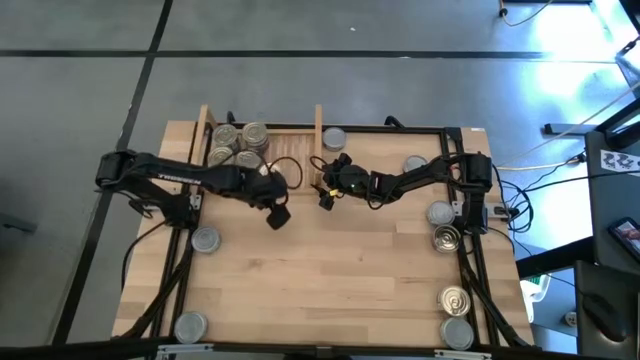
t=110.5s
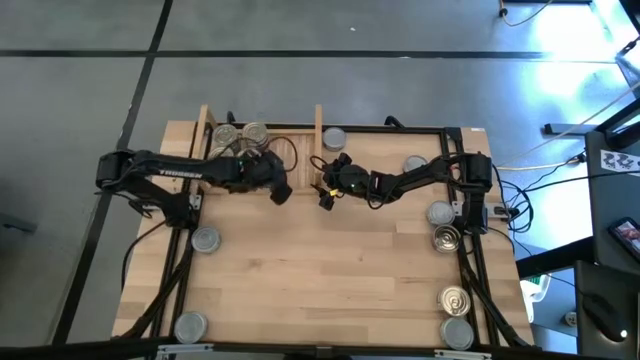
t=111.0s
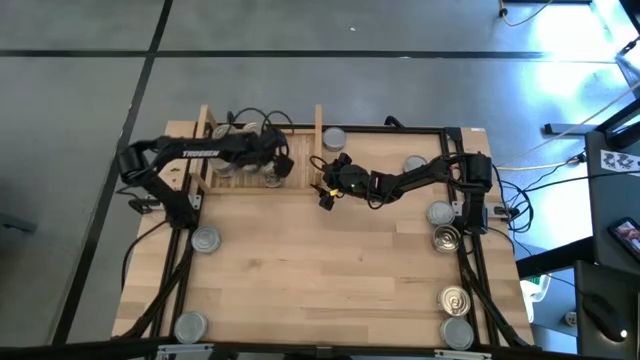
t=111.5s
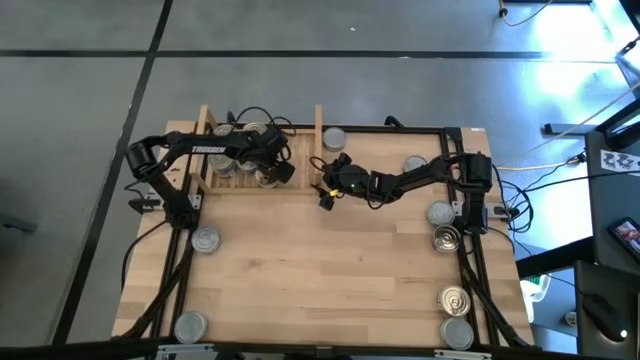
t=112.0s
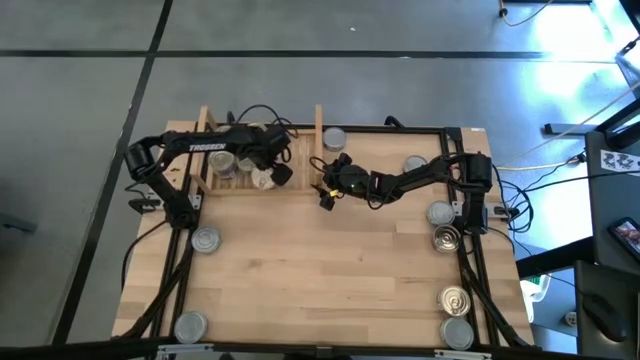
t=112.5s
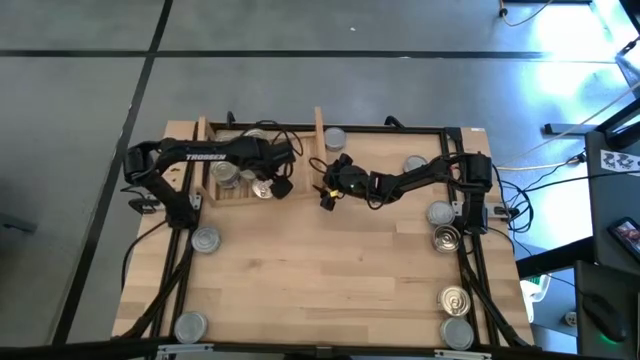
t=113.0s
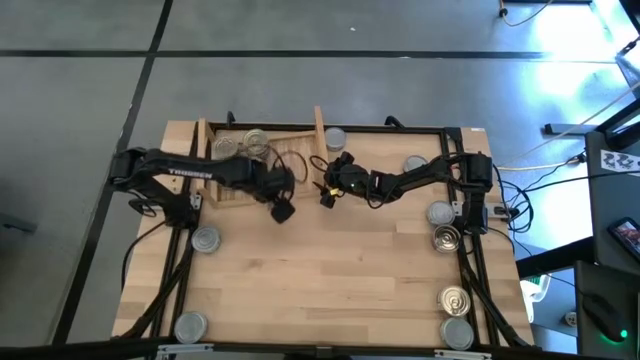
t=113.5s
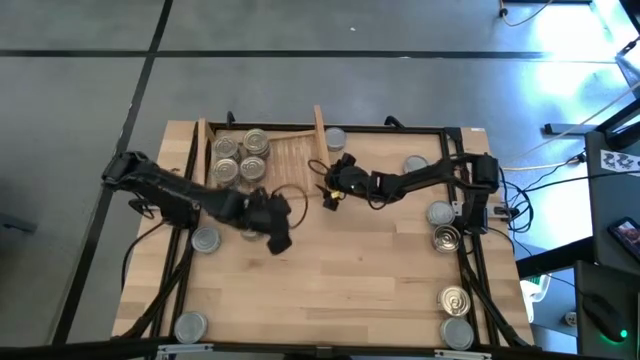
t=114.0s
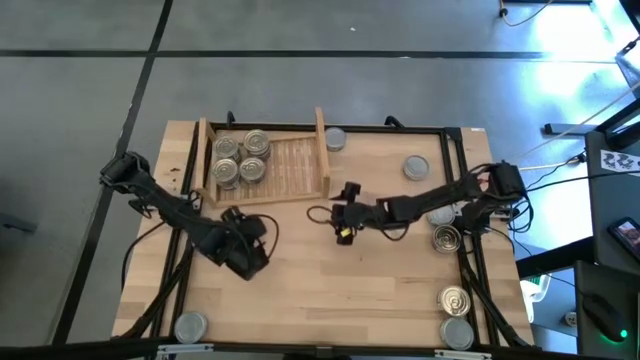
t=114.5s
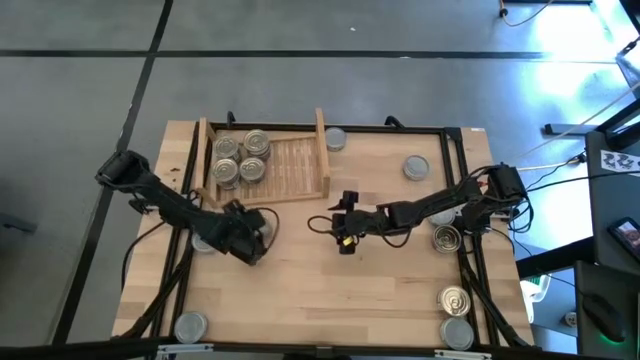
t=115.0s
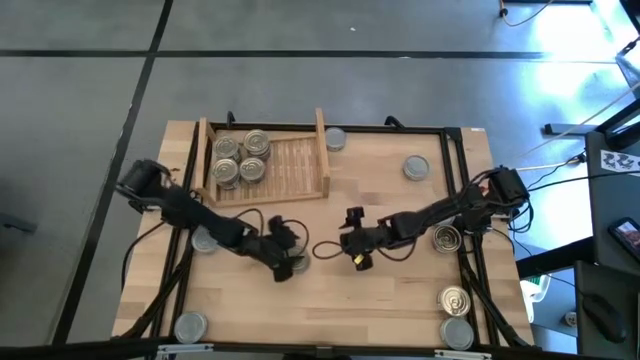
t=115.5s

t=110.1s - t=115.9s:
Task: Stack canned seafood by type on shelf
Remove the blue tuna can from the shelf

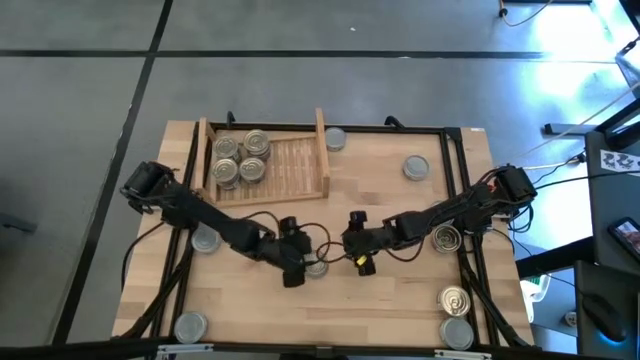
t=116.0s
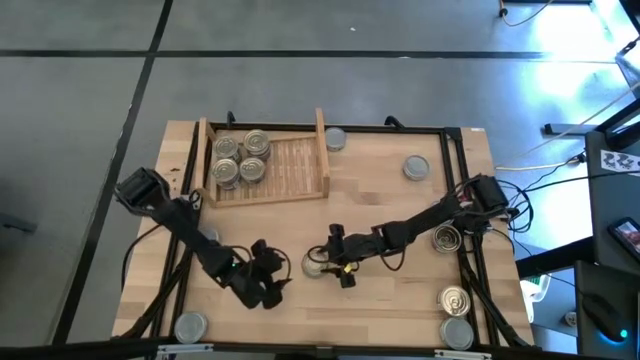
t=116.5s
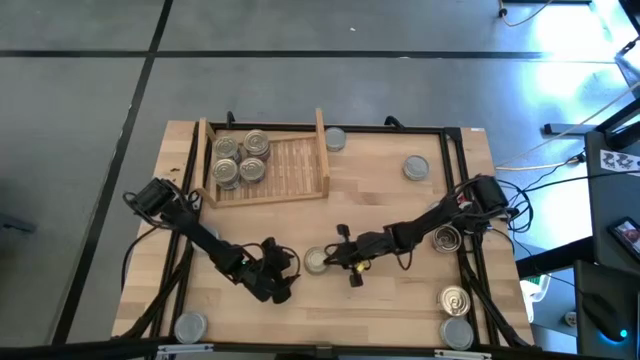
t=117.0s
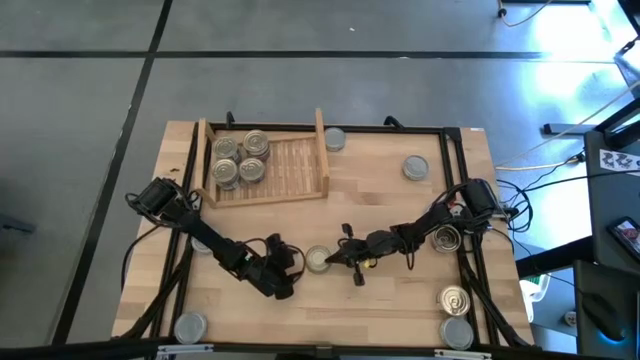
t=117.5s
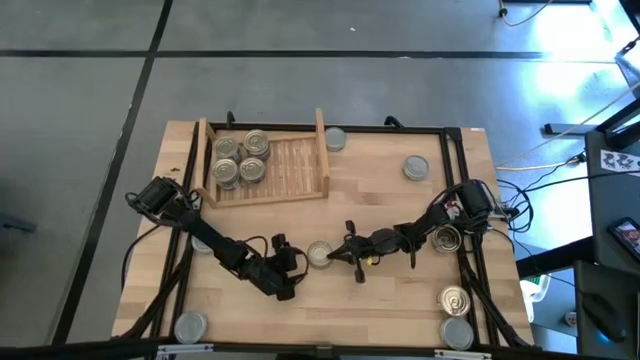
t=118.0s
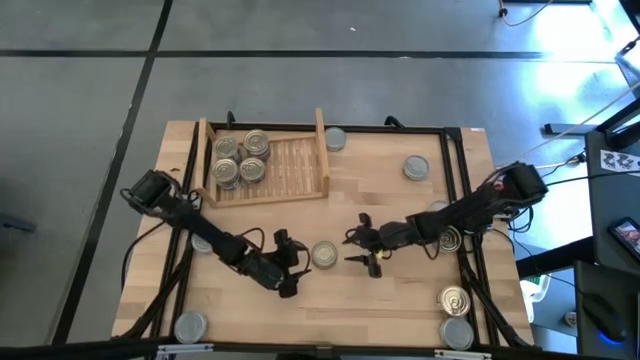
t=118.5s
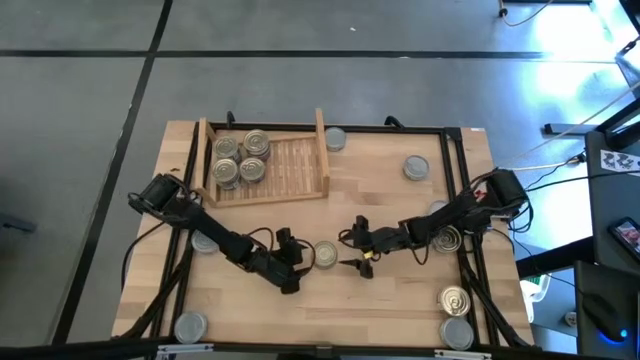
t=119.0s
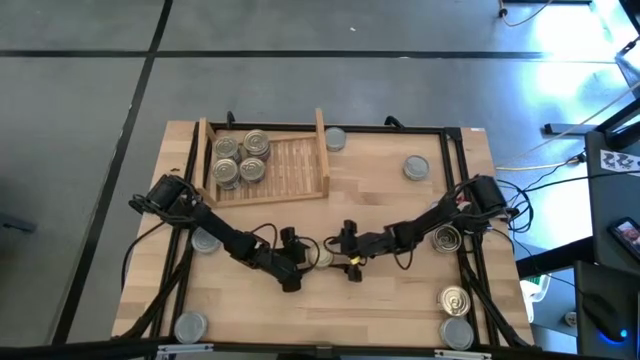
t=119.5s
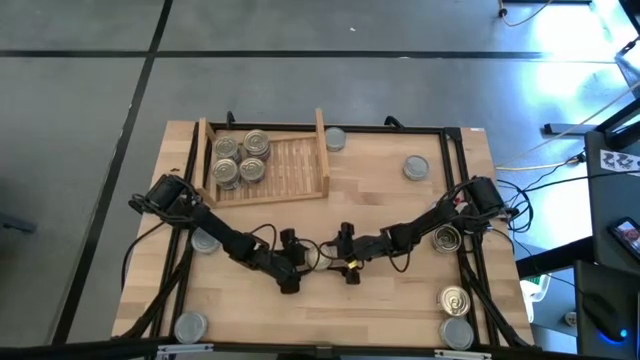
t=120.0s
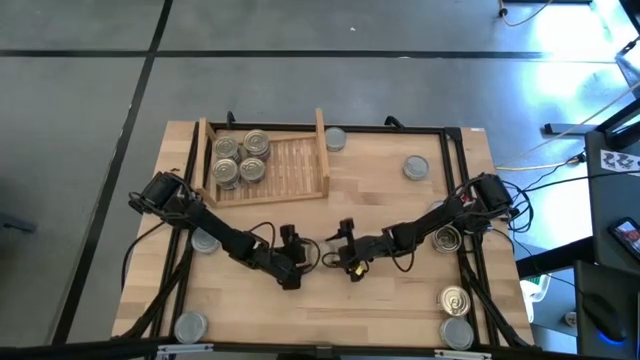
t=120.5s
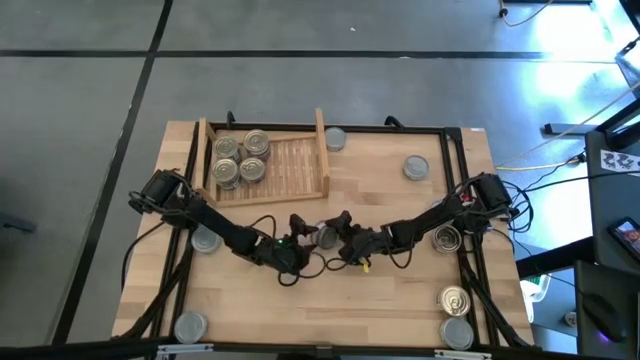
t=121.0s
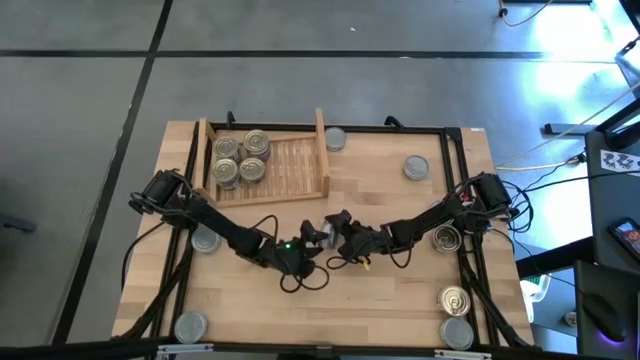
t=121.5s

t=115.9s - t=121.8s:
Prepare the blue tuna can

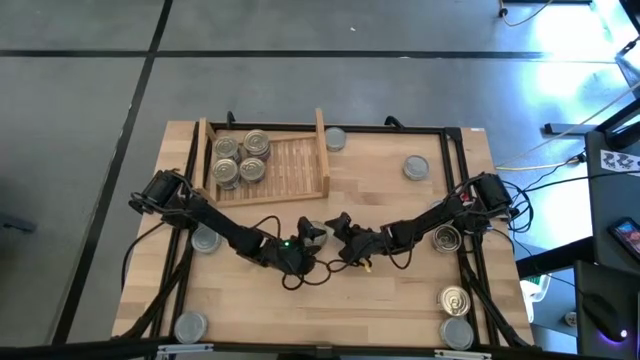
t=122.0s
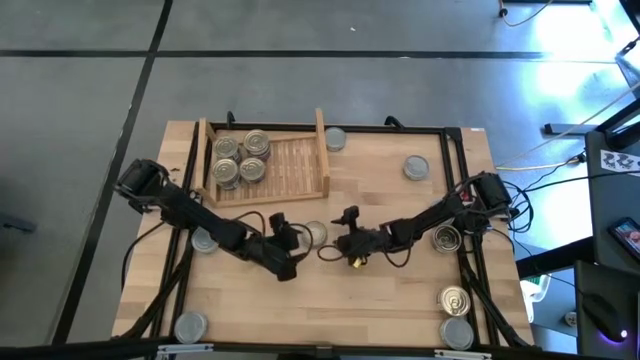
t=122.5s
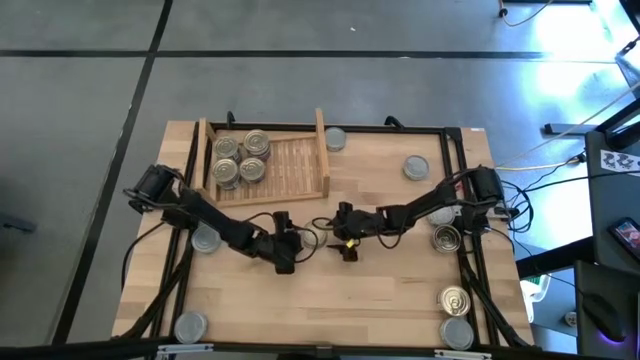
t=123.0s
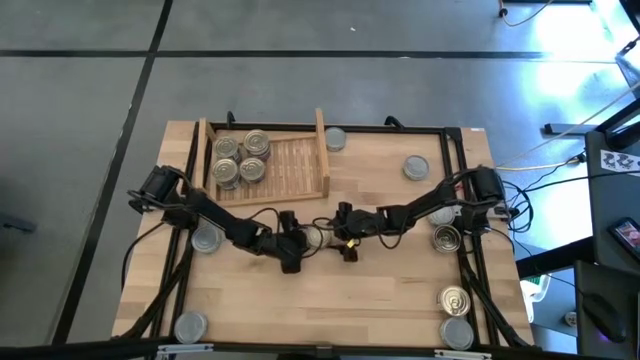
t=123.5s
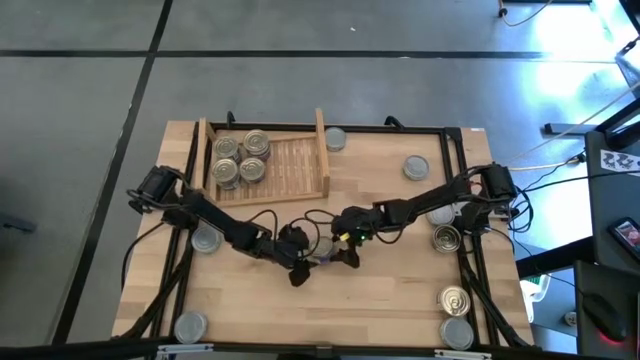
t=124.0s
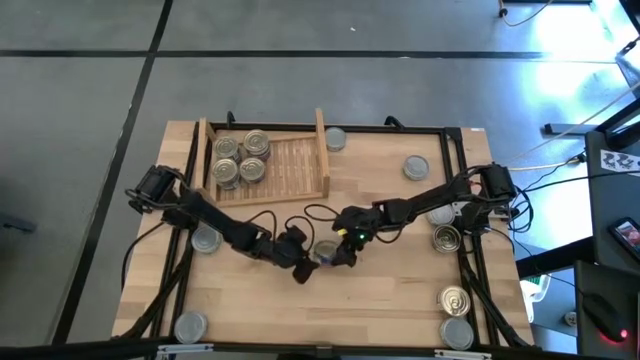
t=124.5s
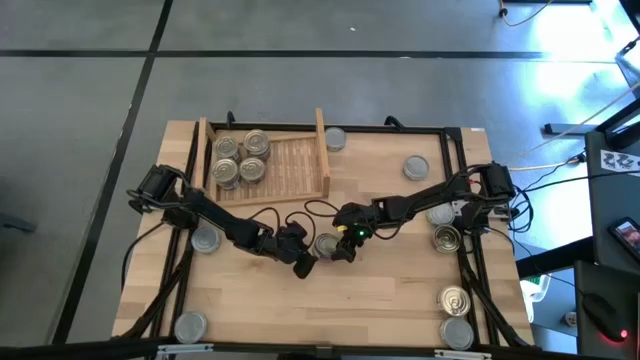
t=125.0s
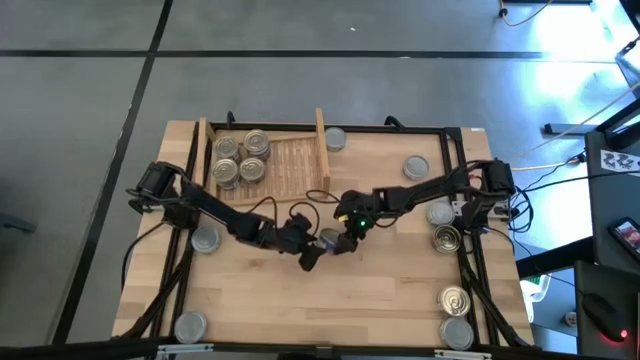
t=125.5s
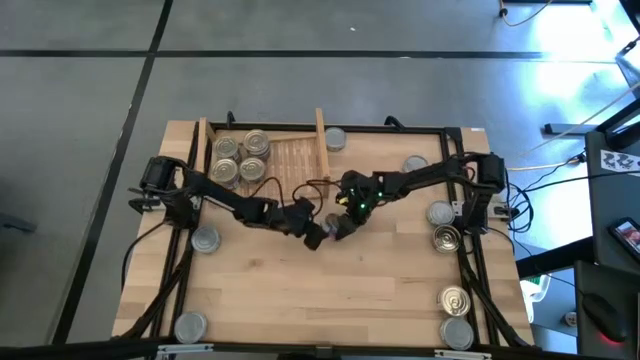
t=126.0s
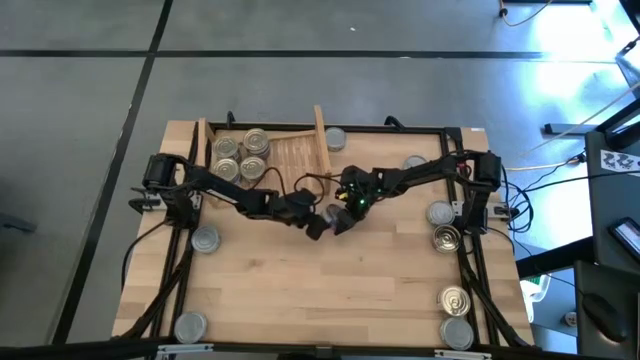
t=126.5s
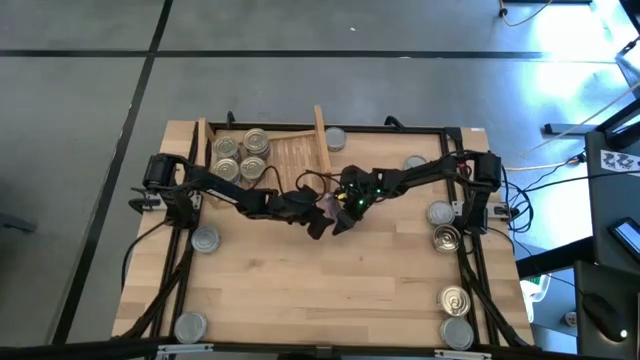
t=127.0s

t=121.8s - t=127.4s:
Prepare the blue tuna can

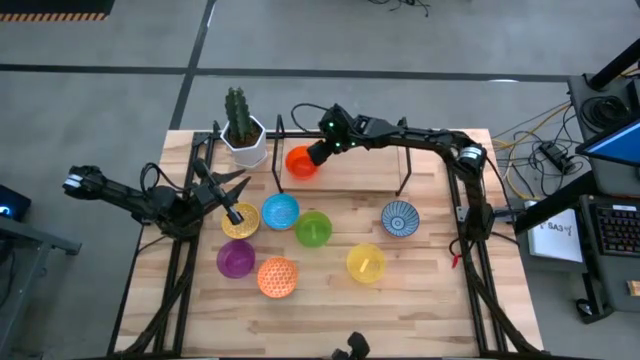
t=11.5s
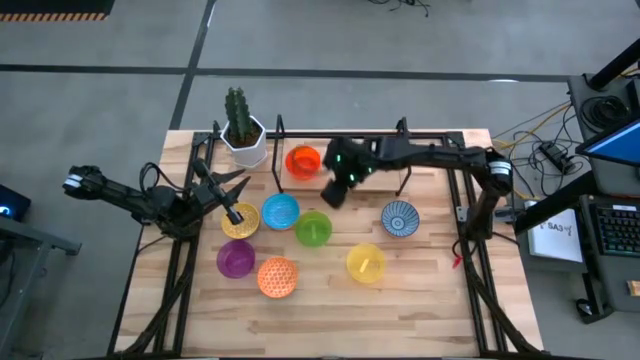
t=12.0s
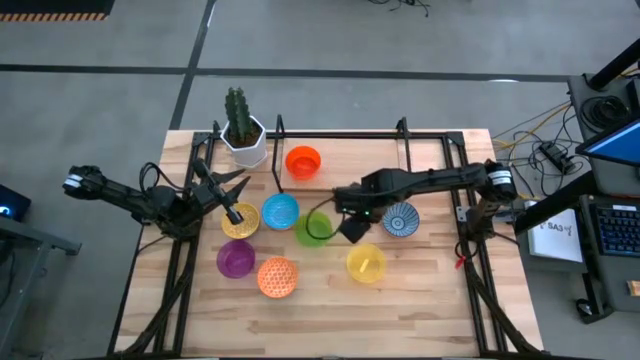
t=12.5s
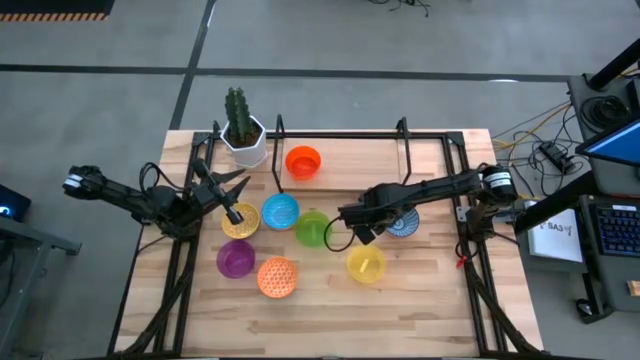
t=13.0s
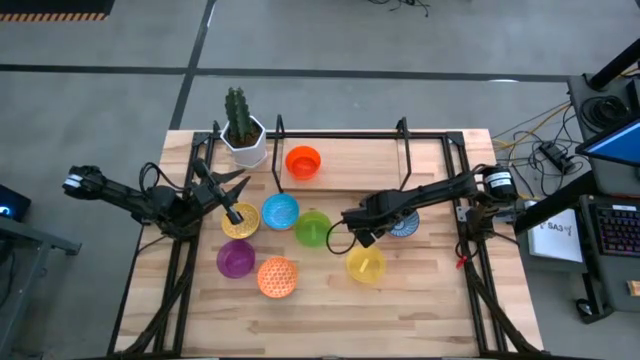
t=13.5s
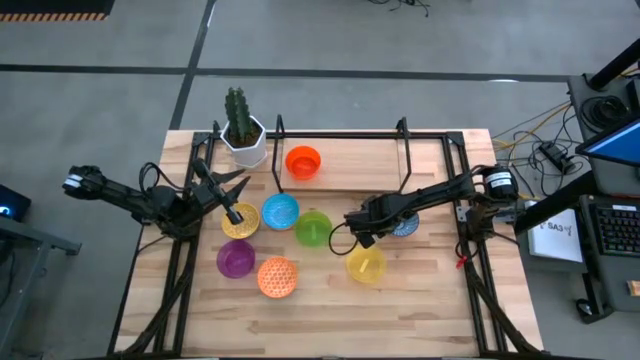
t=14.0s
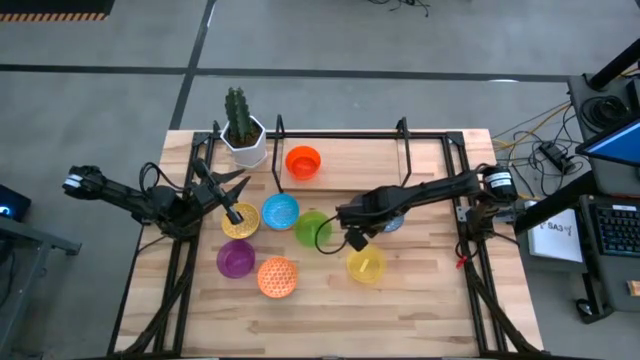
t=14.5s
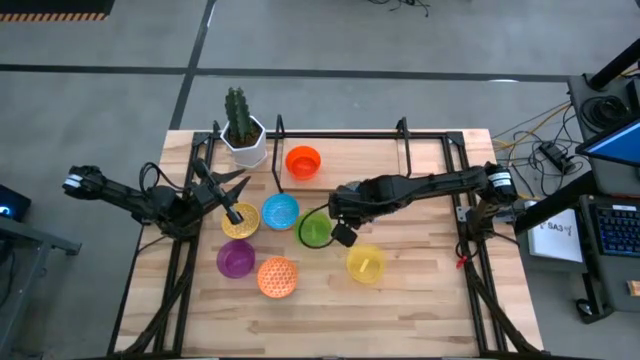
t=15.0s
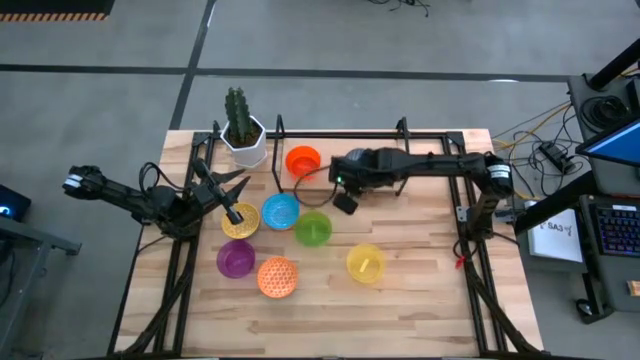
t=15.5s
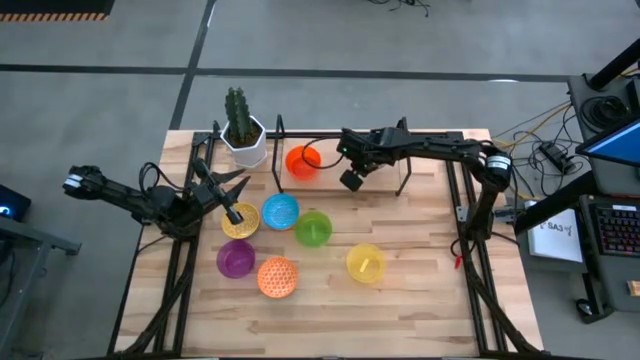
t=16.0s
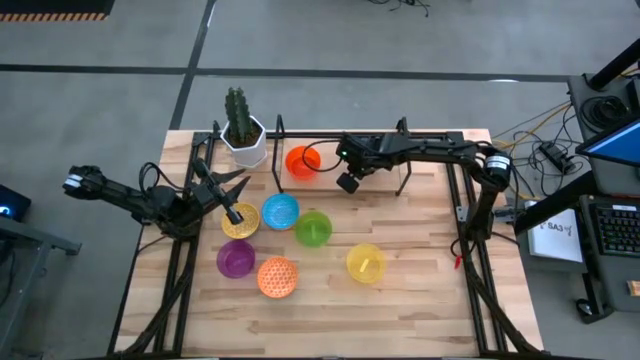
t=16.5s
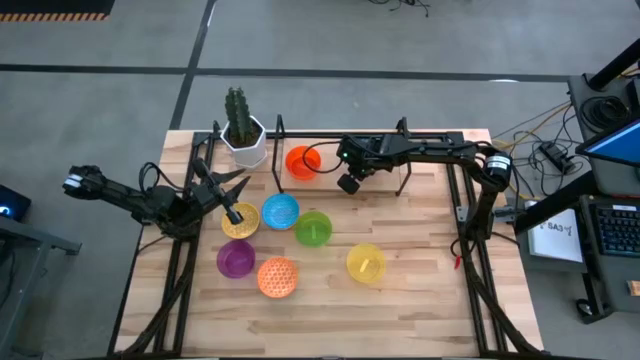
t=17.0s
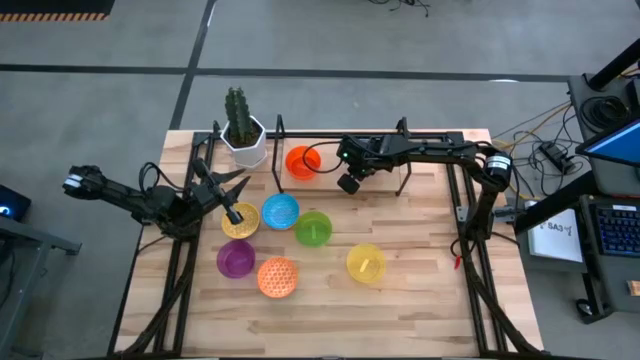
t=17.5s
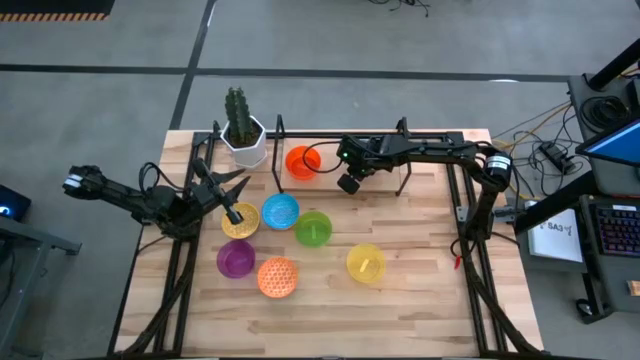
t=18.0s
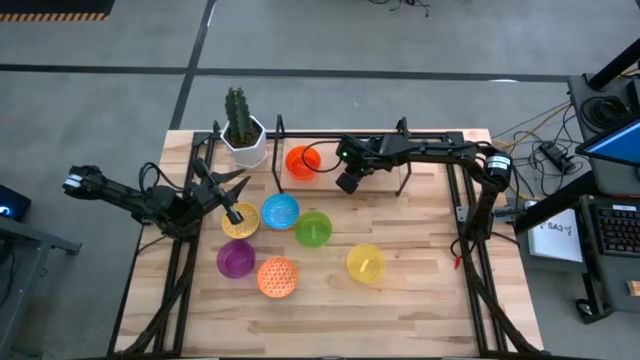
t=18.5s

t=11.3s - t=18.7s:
Task: Place and stack bowls onto a shelf
Put the blue patterned bowl on the shelf
